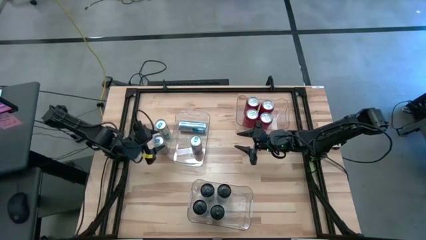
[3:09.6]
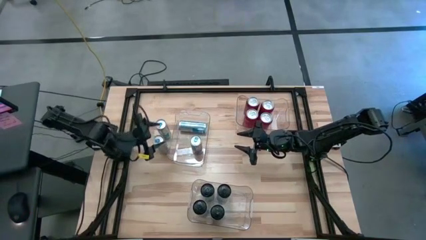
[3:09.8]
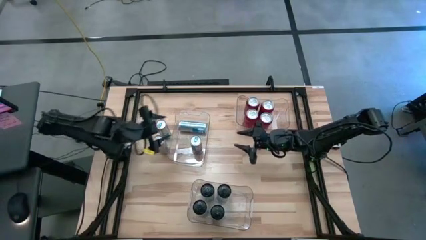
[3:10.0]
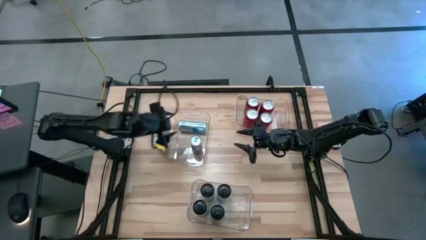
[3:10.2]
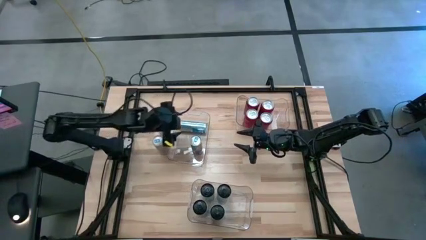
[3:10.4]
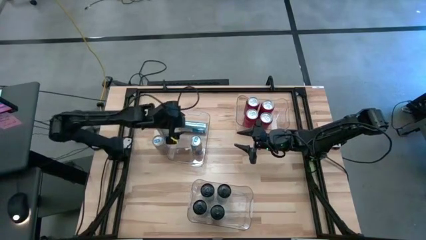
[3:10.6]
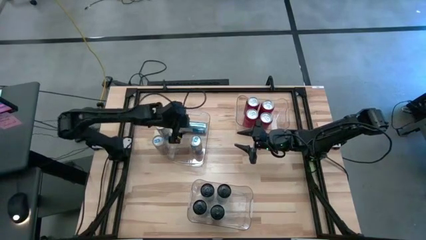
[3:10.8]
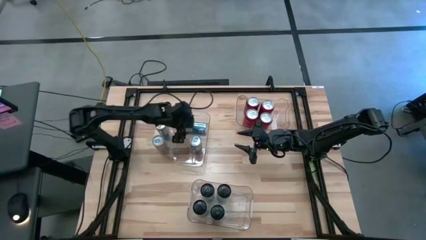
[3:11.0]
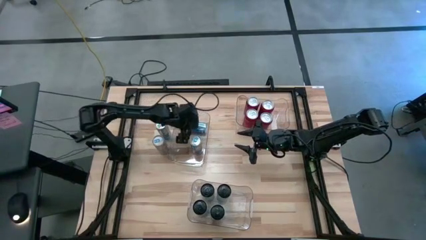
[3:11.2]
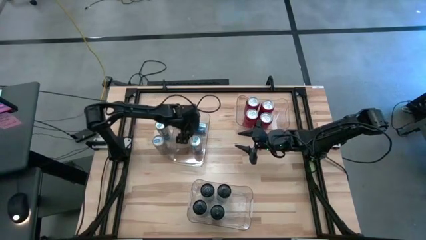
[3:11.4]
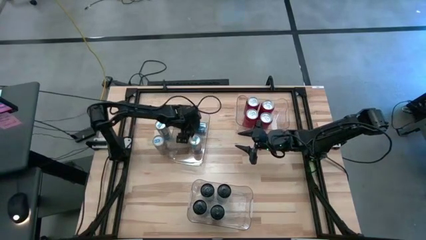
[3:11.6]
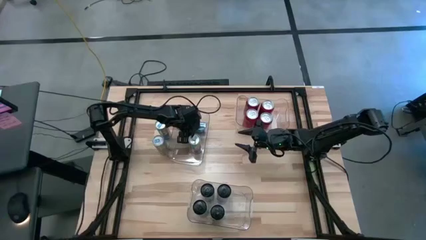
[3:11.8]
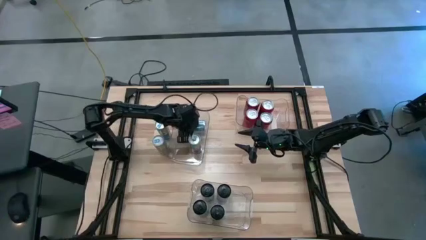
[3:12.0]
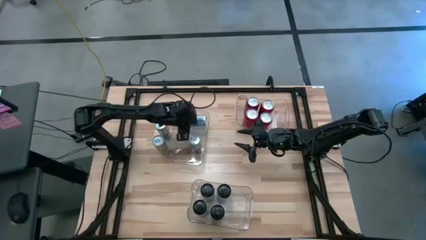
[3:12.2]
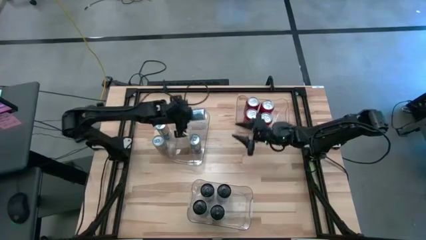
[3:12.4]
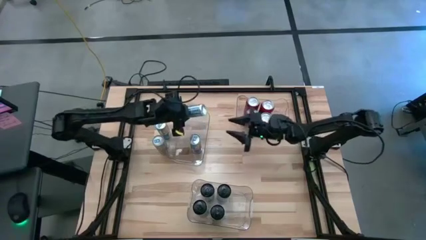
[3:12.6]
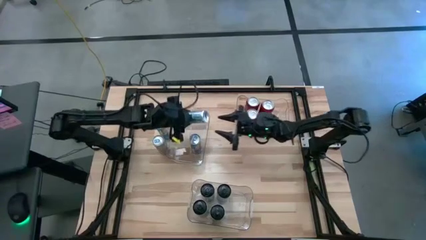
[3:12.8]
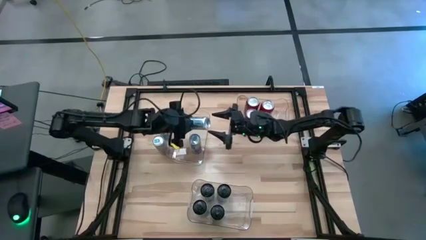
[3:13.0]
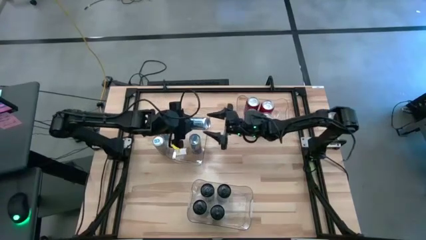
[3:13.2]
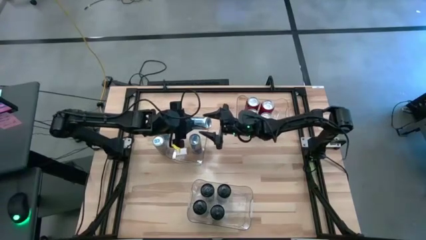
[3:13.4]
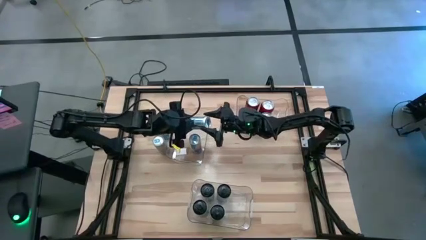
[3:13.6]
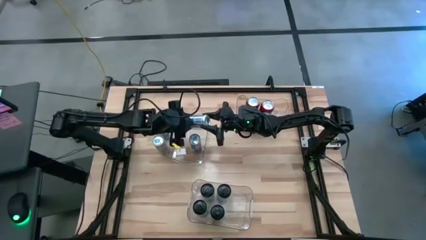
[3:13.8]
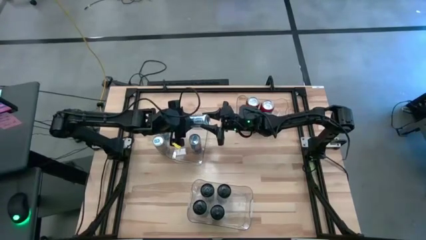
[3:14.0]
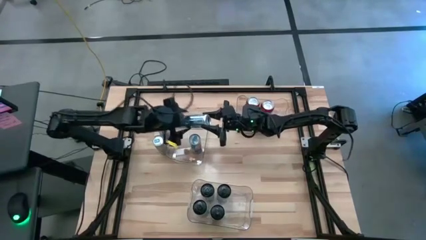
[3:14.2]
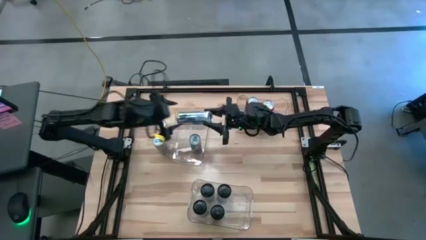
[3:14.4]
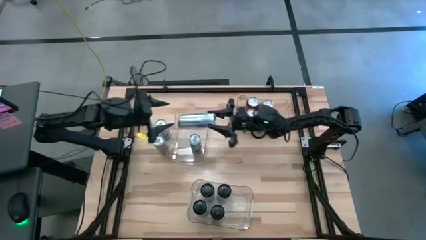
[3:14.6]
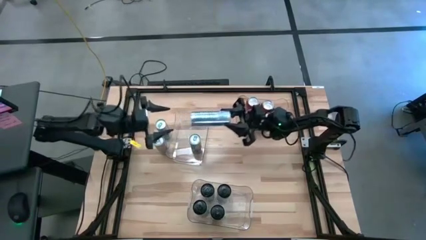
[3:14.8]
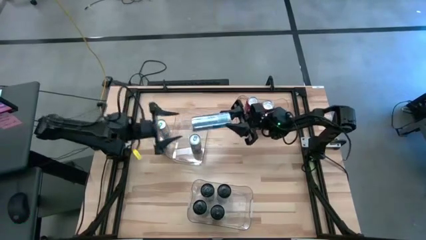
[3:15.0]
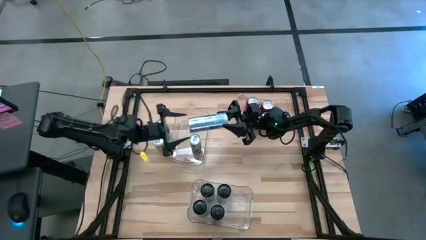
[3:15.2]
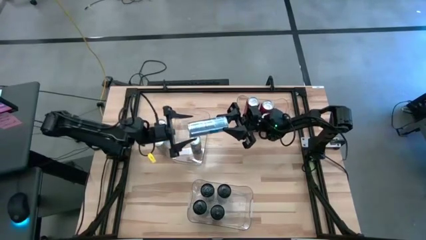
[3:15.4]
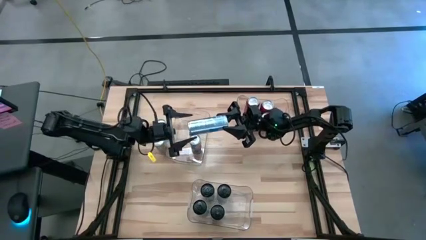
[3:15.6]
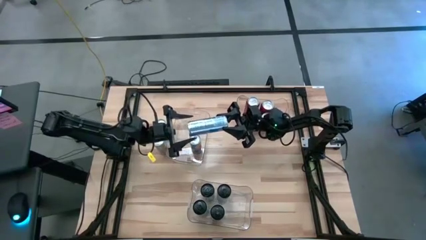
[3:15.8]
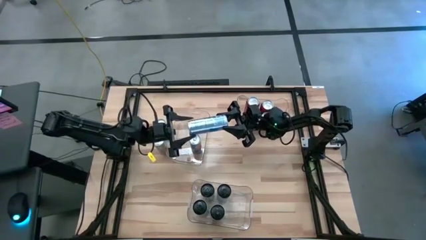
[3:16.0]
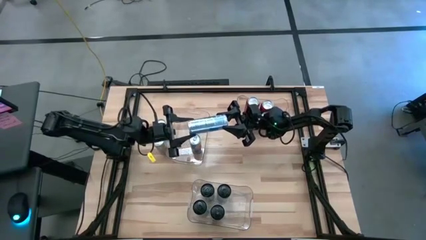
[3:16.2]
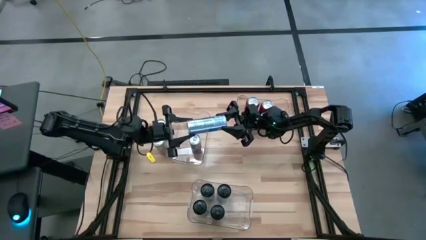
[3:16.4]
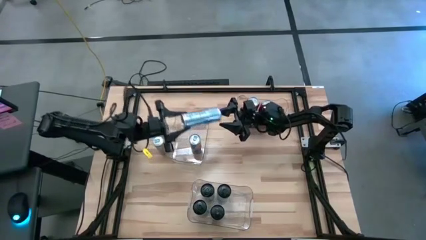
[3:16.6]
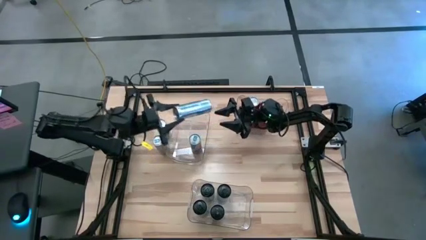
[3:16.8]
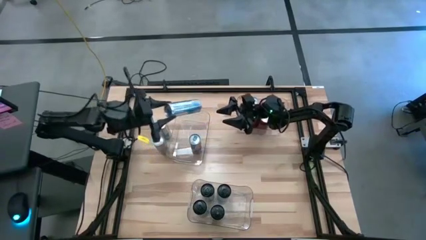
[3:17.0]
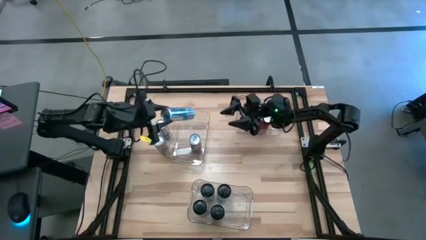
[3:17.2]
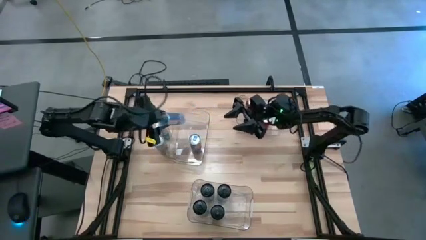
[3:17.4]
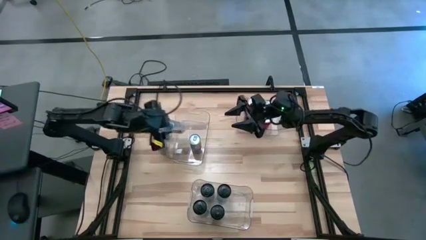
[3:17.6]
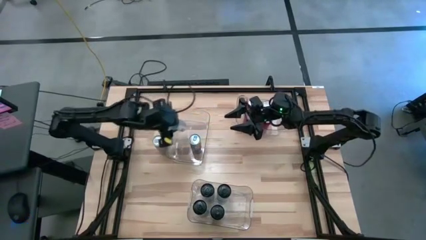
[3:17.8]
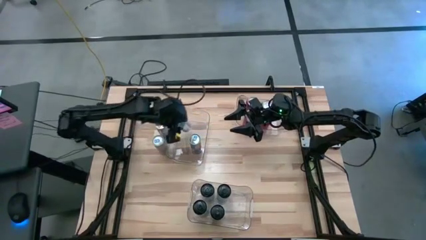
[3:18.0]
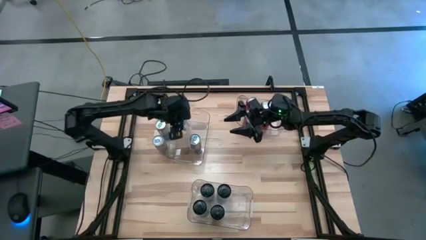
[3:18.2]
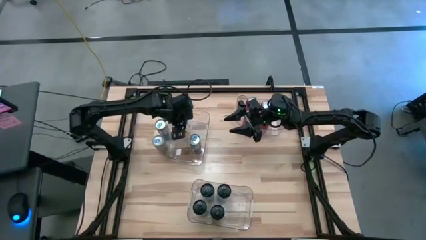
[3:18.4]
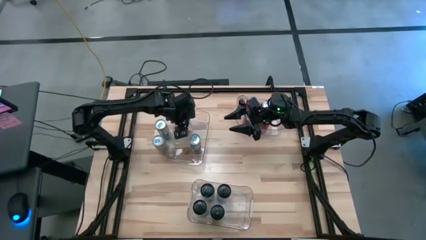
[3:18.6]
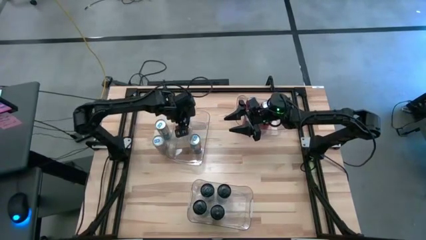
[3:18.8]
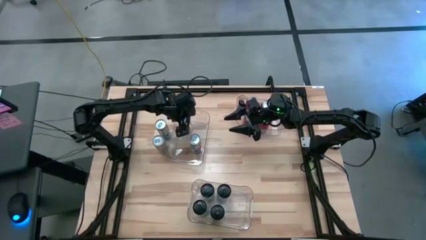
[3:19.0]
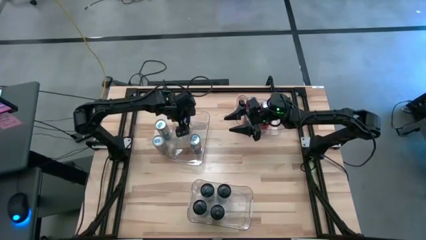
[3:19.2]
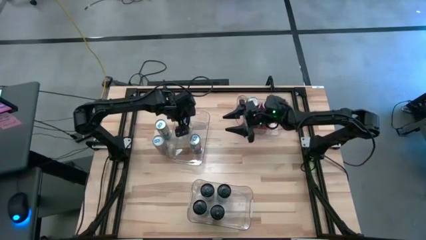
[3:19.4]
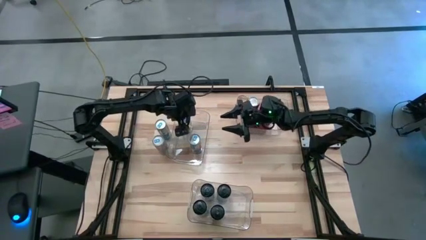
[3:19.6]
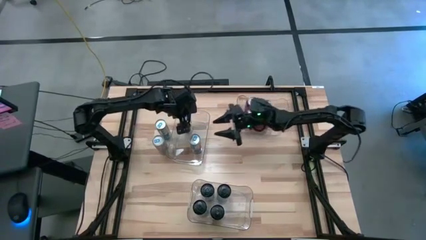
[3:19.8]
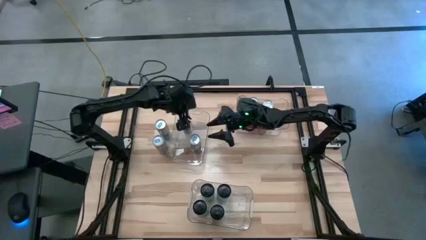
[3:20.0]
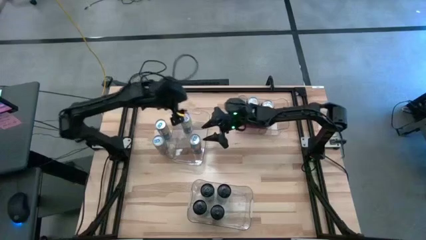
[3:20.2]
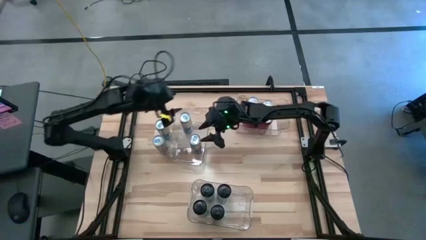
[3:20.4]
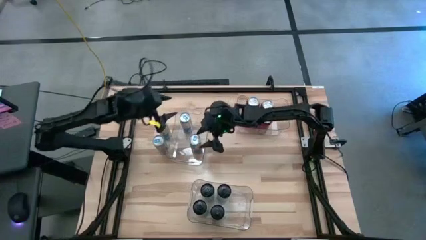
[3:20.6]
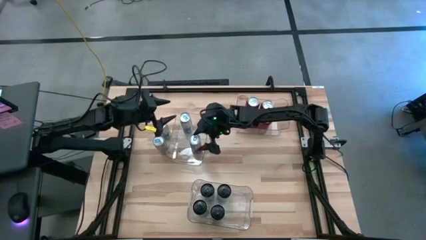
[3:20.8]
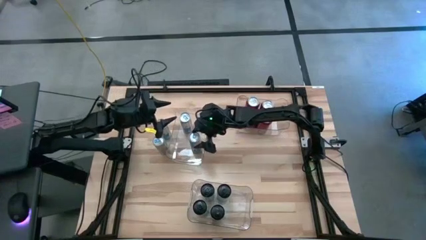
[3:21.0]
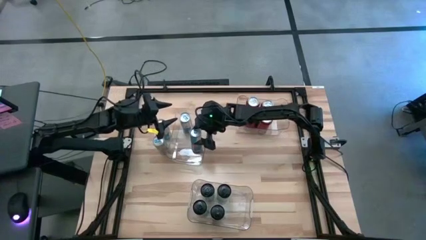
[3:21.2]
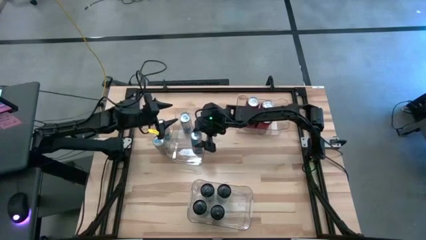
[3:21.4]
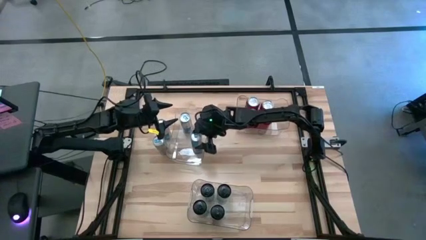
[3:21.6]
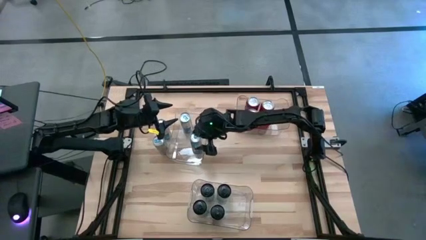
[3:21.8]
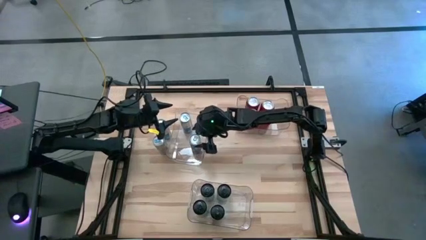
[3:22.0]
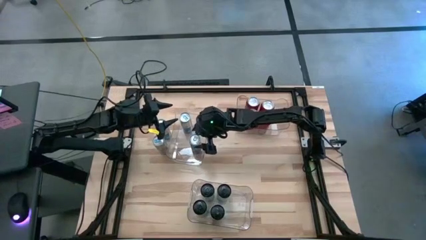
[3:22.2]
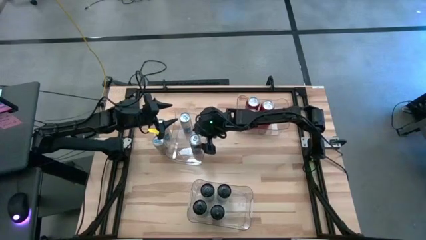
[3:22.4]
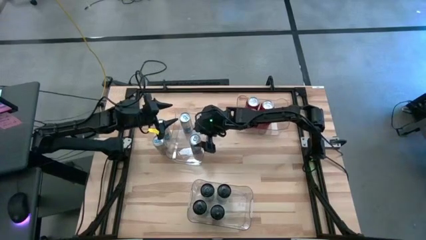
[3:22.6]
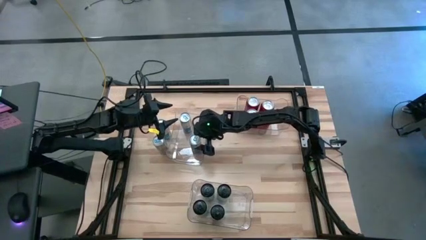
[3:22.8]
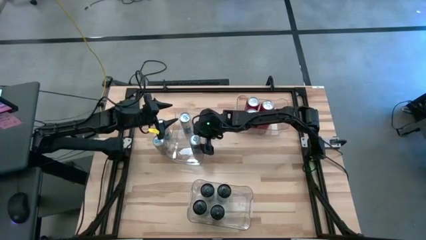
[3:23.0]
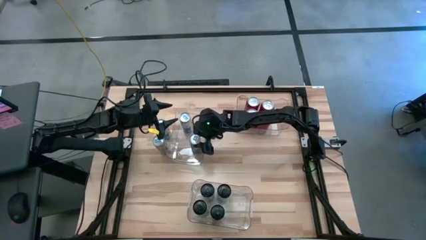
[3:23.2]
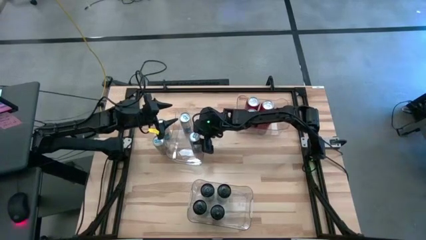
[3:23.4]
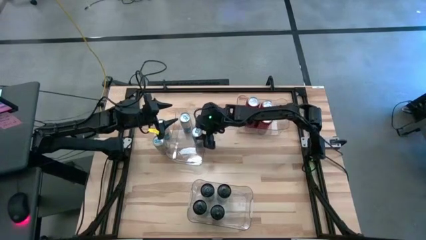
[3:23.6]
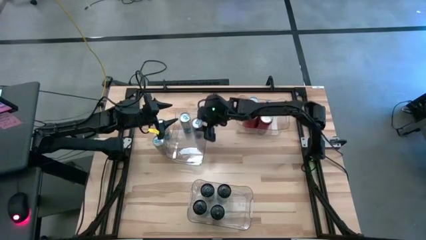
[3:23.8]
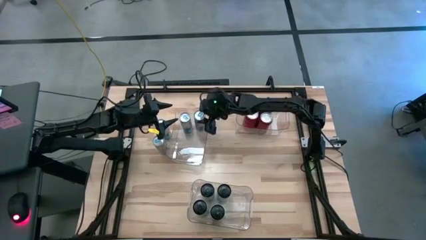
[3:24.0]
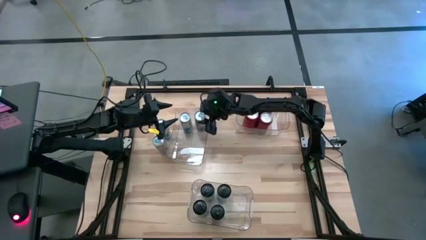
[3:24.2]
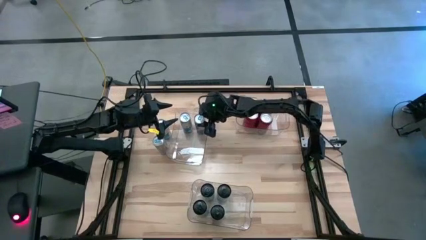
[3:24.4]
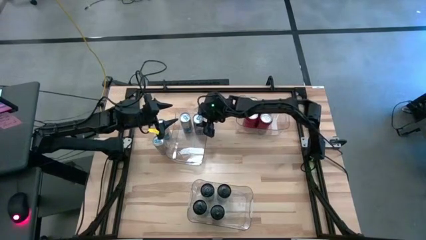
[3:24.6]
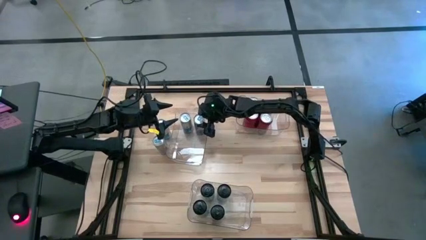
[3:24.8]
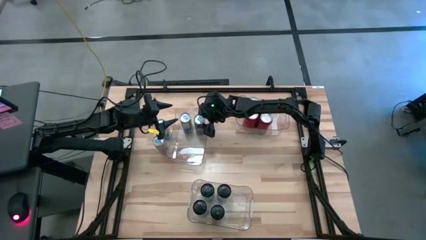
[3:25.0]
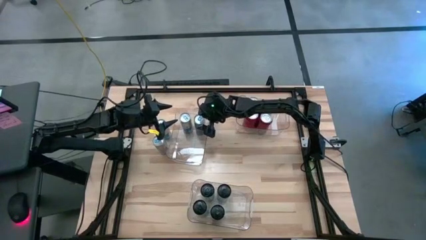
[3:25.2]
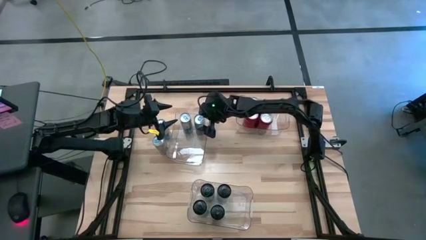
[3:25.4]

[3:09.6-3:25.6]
Task: Sort soda cans
Adjust the blue soda cans in the top left transparent bin
